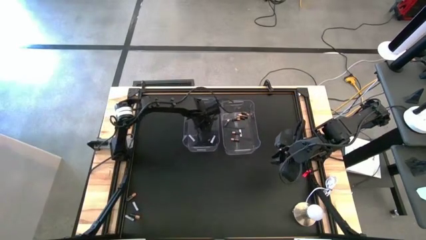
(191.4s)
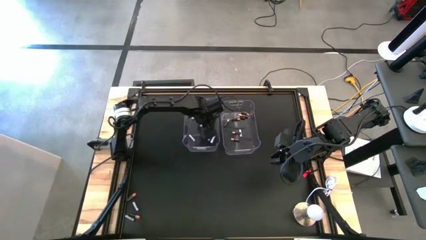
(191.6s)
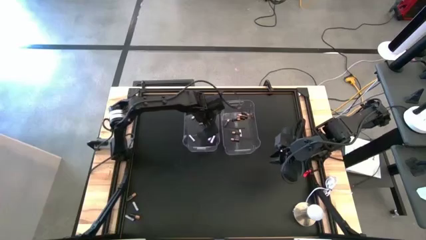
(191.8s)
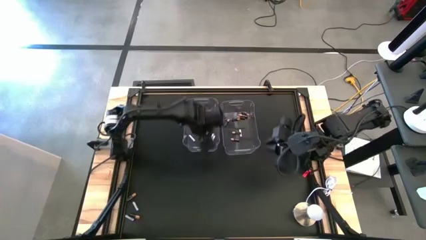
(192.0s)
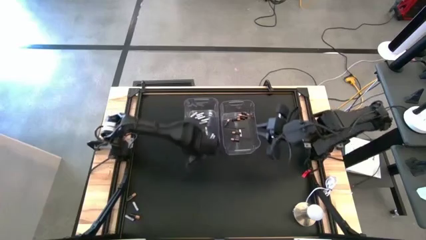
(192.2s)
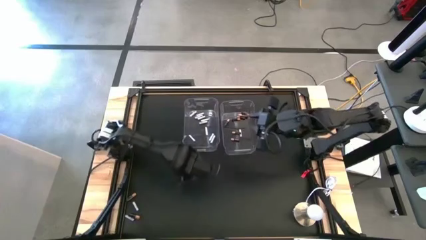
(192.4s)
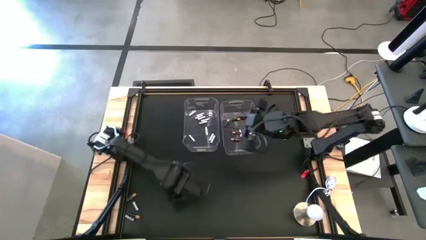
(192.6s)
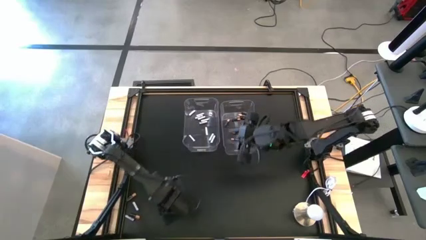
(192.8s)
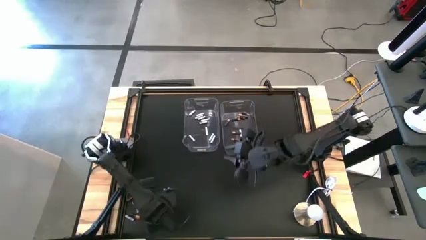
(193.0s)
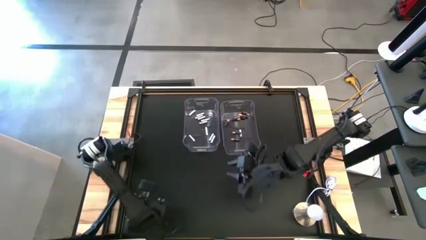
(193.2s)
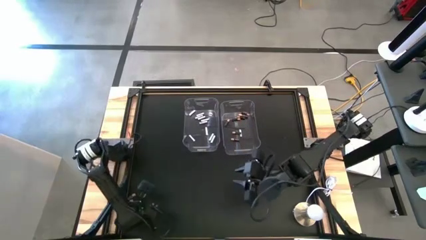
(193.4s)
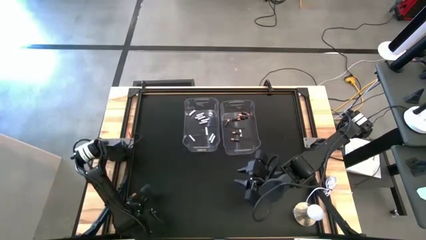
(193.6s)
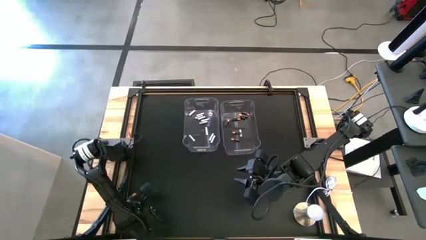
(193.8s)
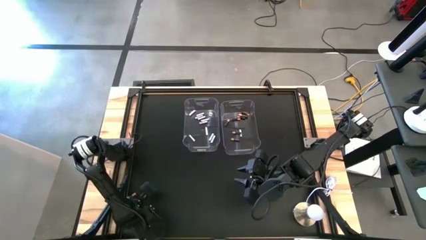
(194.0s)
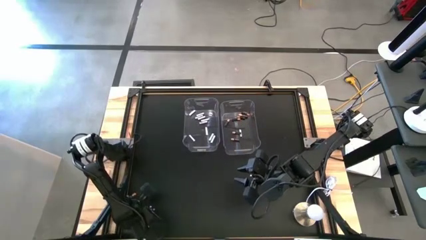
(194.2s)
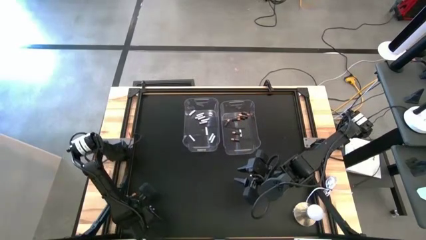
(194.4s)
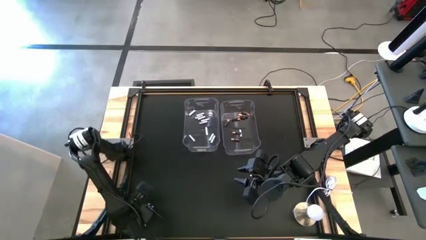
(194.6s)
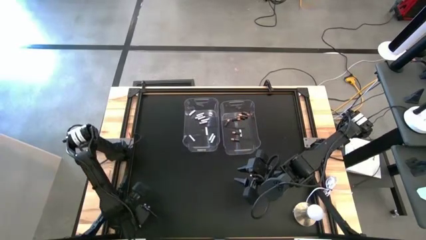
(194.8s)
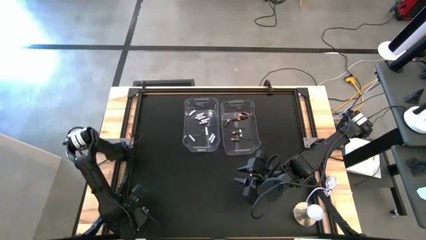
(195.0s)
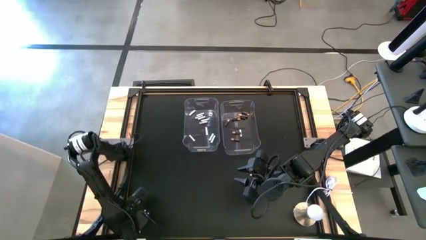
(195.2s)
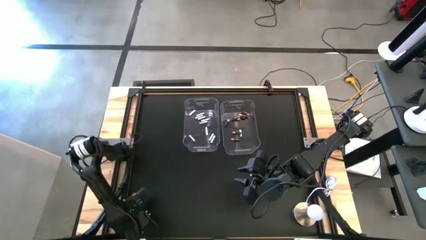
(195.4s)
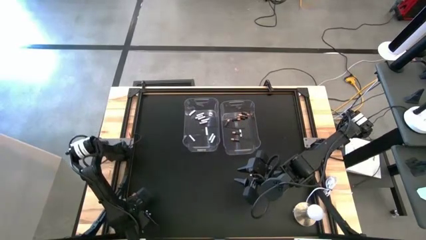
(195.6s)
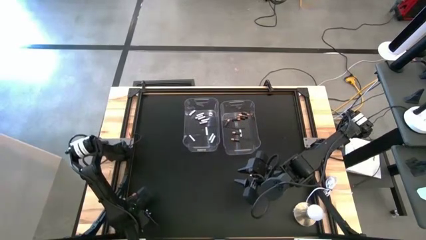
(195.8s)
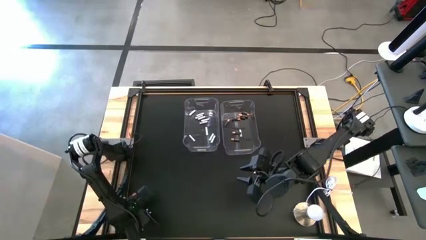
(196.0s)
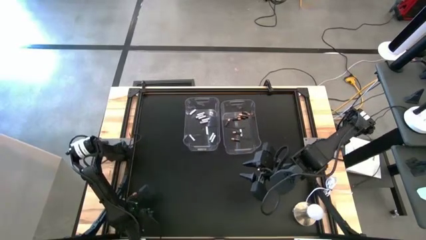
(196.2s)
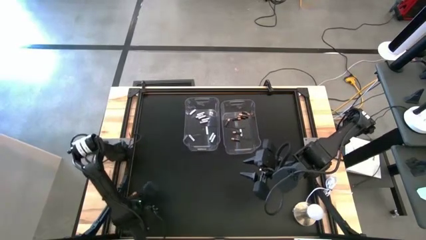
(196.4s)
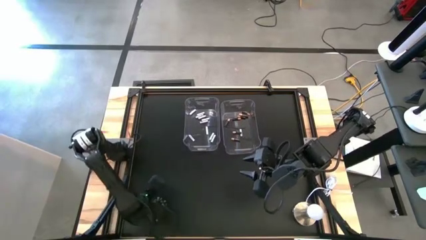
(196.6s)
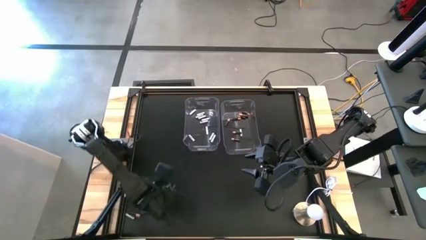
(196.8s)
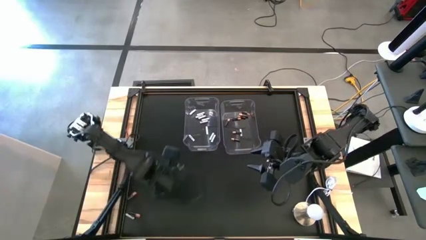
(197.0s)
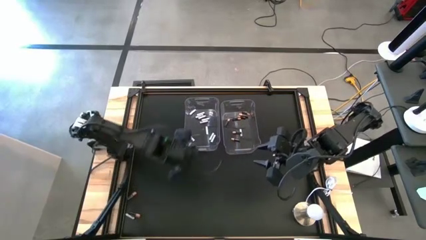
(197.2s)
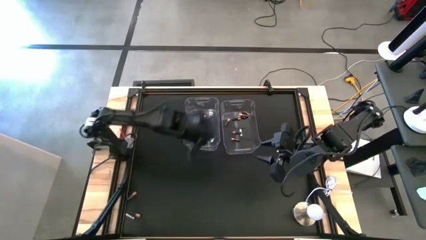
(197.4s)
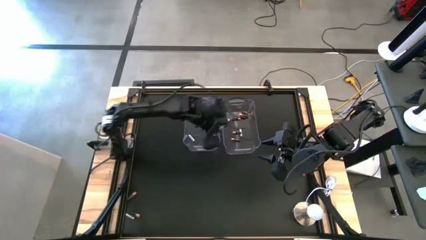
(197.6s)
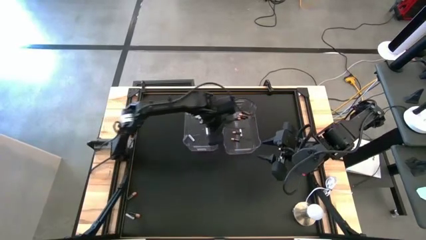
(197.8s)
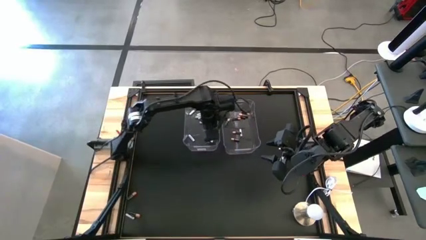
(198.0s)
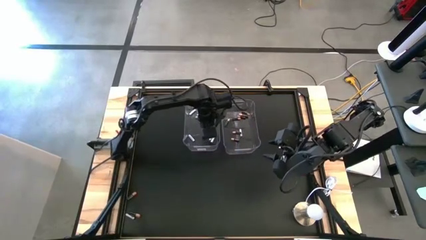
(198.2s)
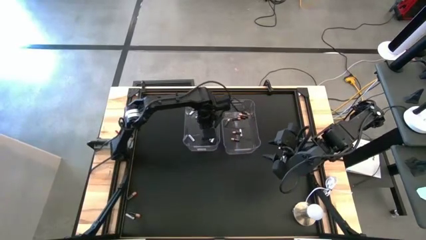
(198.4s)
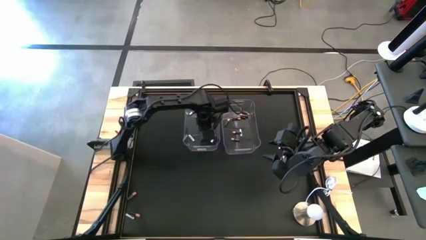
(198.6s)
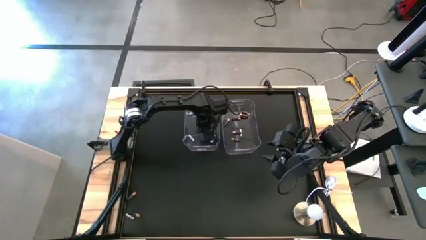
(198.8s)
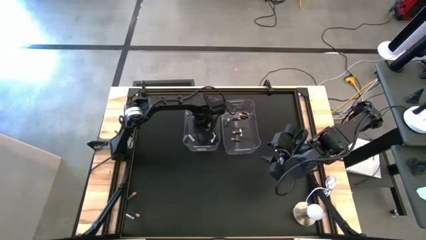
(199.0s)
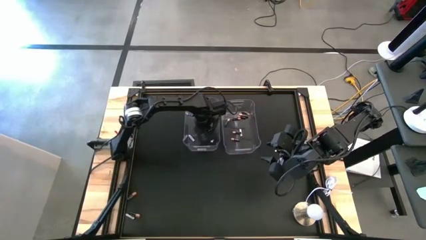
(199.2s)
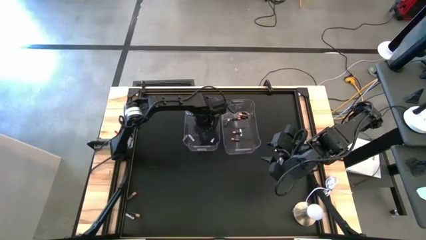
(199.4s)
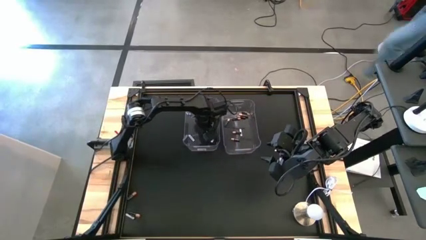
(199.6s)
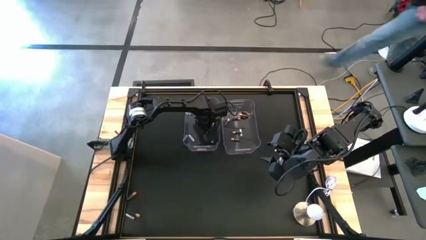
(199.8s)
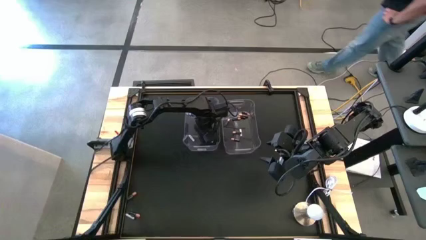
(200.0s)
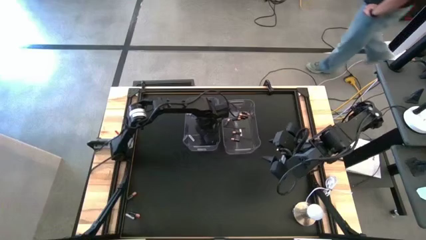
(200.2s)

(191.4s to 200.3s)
Task: Sort batteries
Put the white battery into the left transparent bin

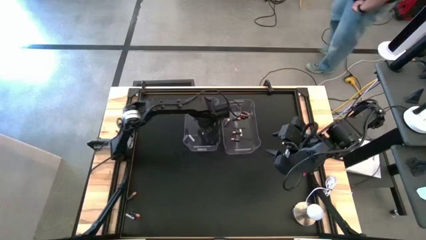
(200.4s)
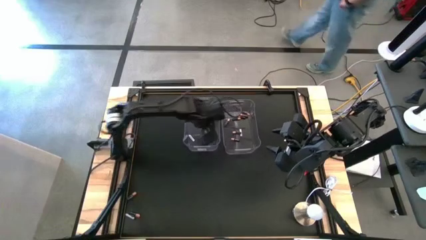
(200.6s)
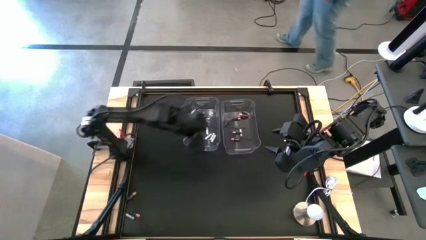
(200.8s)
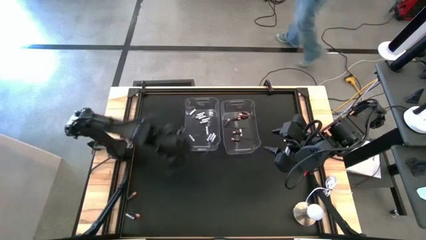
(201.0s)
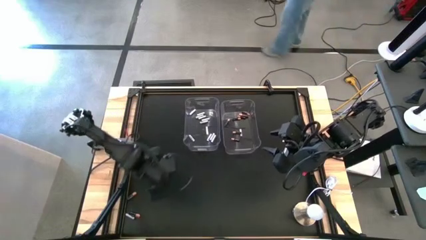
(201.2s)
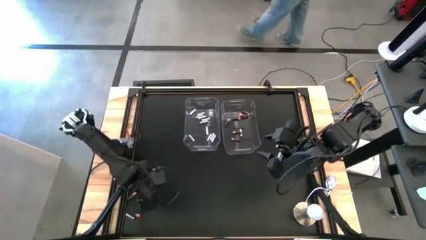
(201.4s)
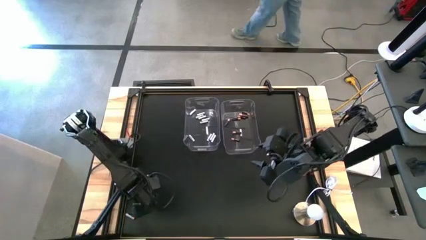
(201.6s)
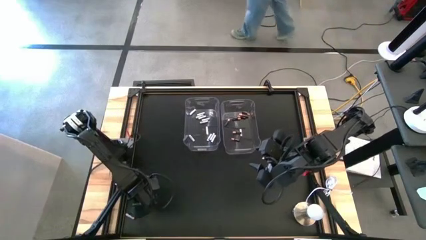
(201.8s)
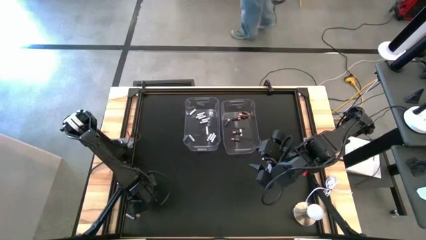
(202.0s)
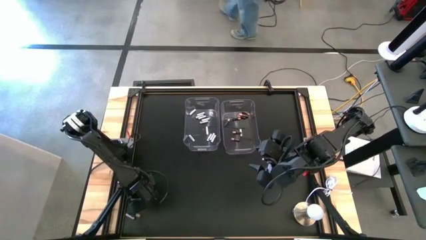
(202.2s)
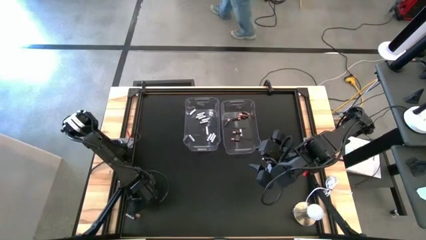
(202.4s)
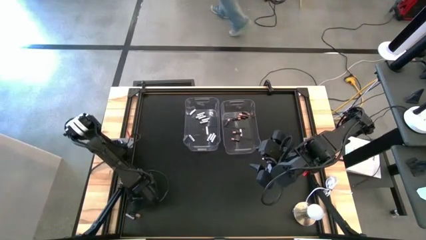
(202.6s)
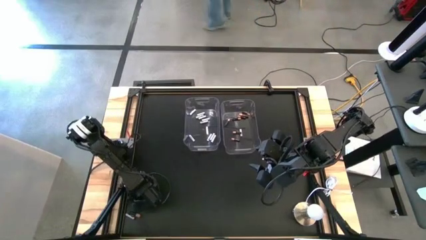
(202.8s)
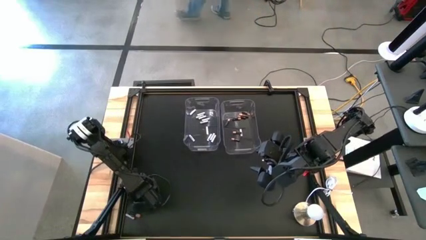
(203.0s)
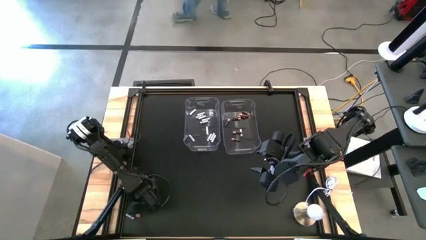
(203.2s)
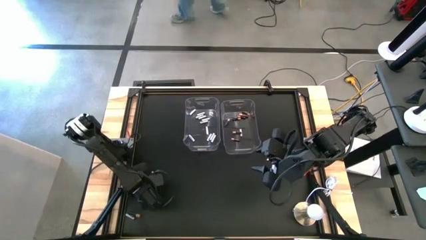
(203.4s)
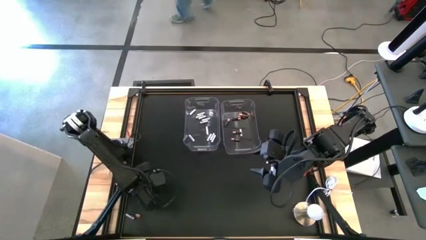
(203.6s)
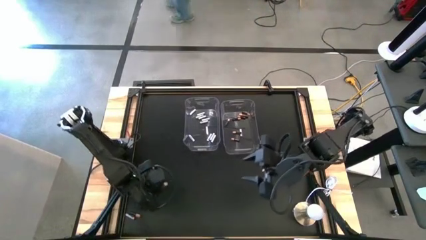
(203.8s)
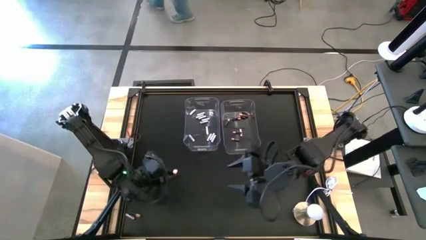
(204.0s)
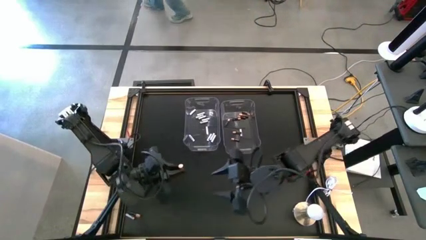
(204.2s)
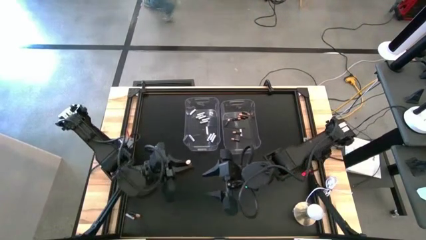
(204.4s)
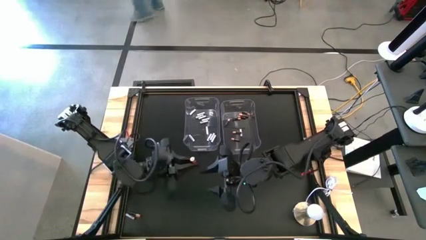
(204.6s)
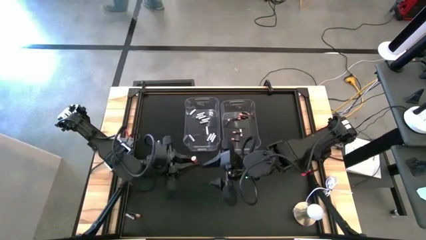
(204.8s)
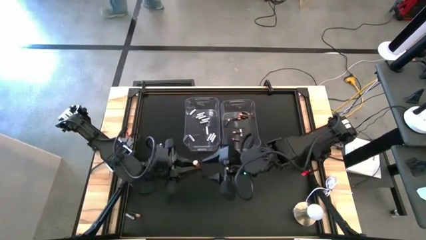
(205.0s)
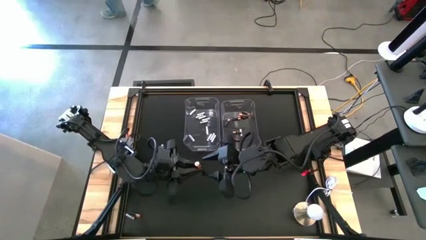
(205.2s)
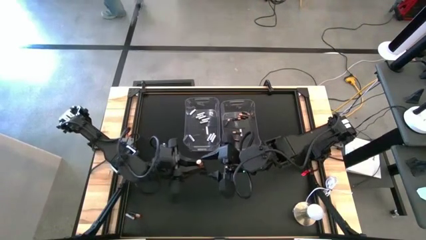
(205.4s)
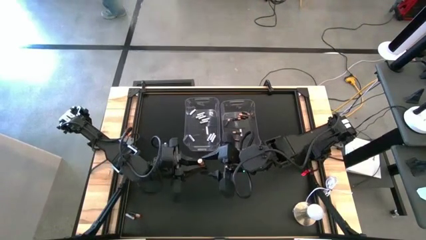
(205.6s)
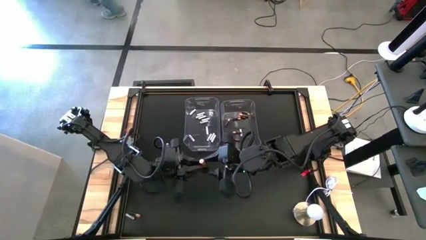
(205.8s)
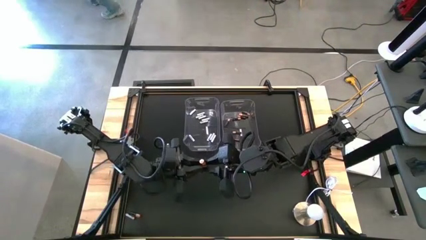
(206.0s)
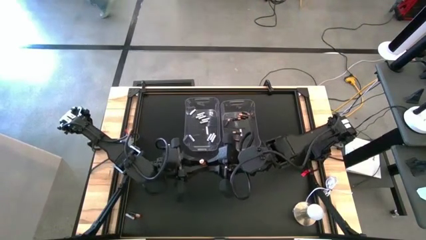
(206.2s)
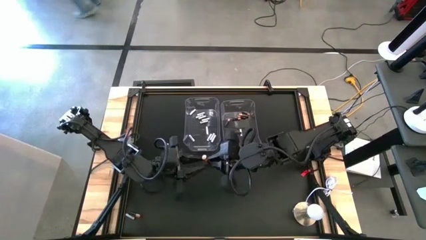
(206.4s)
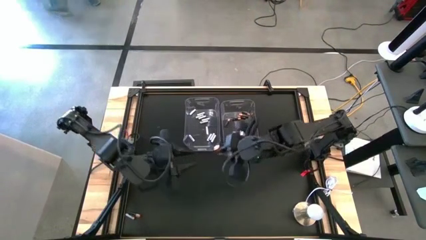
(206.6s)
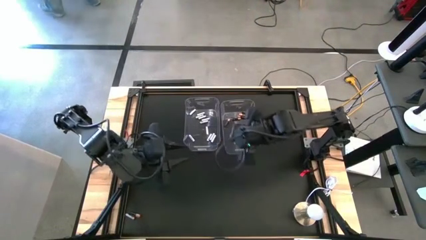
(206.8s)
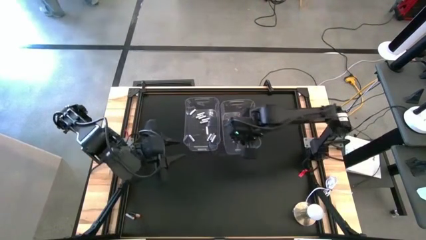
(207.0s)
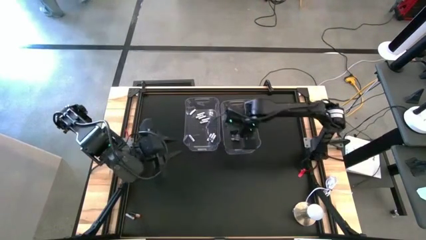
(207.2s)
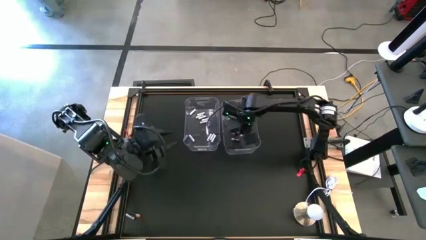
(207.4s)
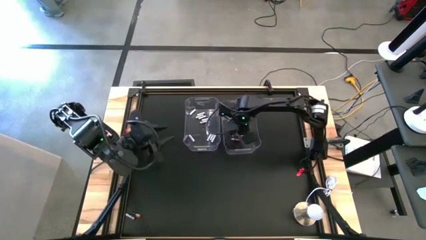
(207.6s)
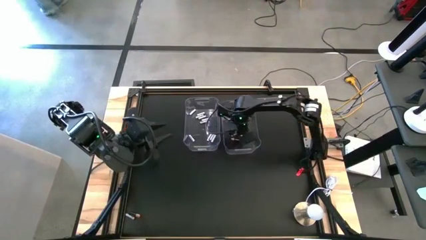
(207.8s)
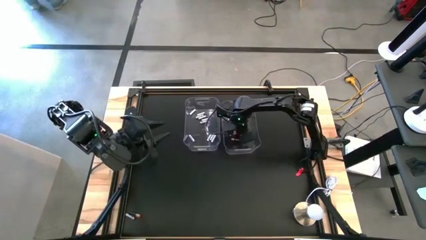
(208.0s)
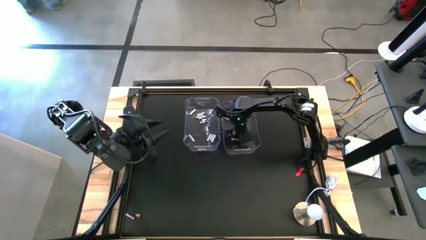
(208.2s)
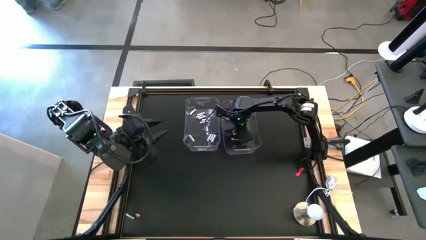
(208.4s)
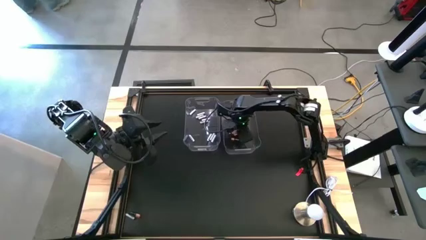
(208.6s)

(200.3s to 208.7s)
Put the black battery into the right transparent bin
